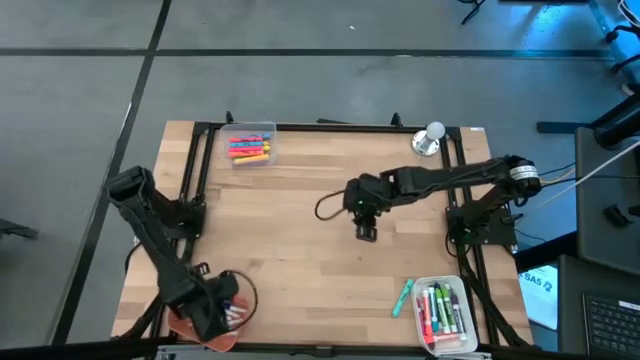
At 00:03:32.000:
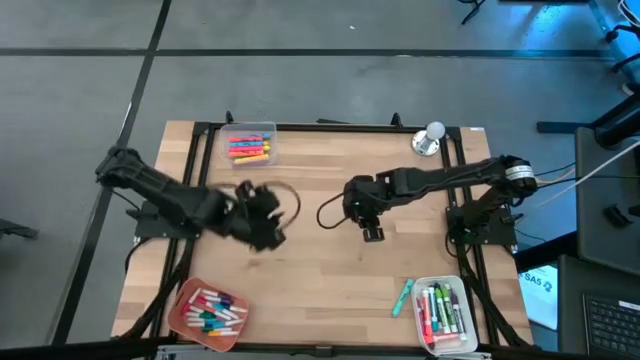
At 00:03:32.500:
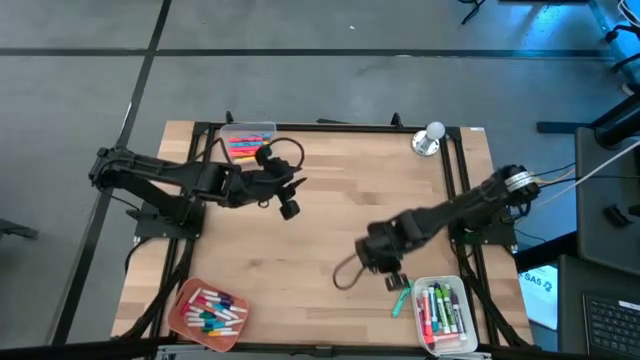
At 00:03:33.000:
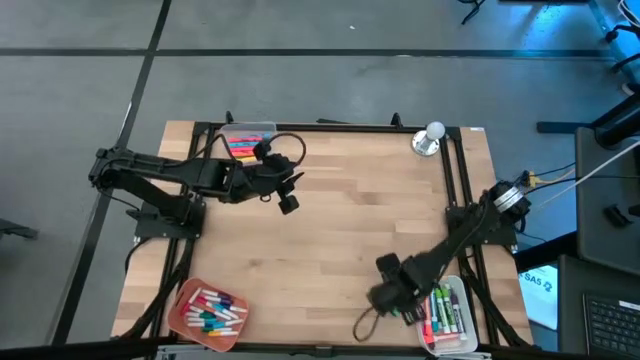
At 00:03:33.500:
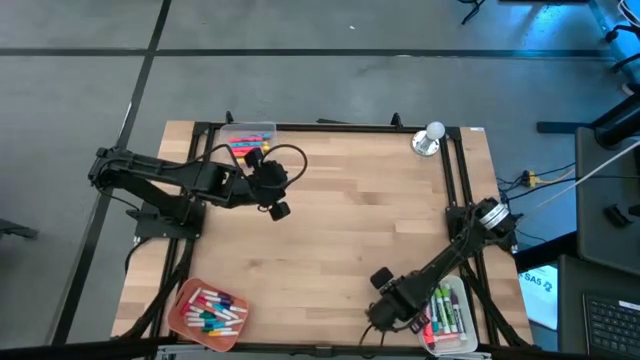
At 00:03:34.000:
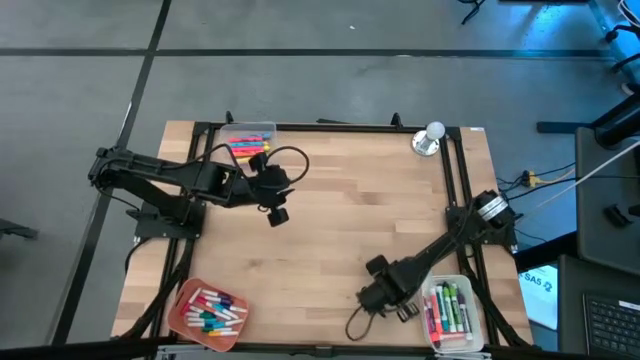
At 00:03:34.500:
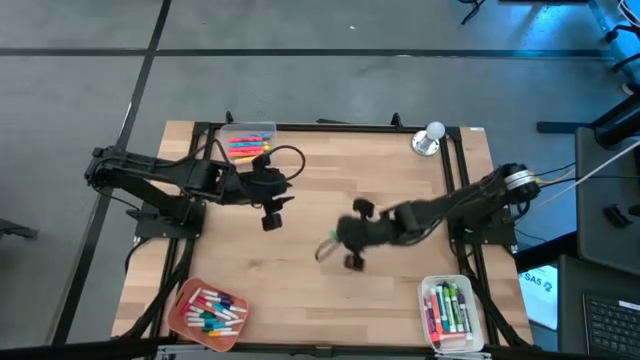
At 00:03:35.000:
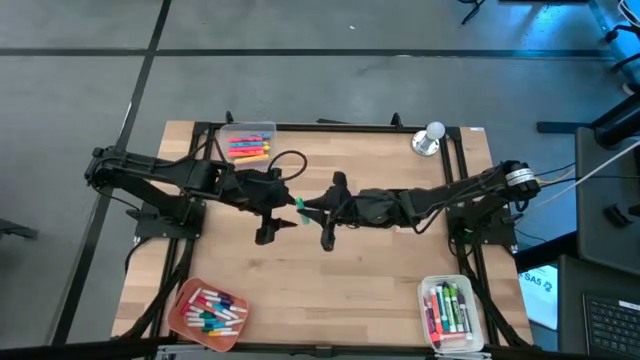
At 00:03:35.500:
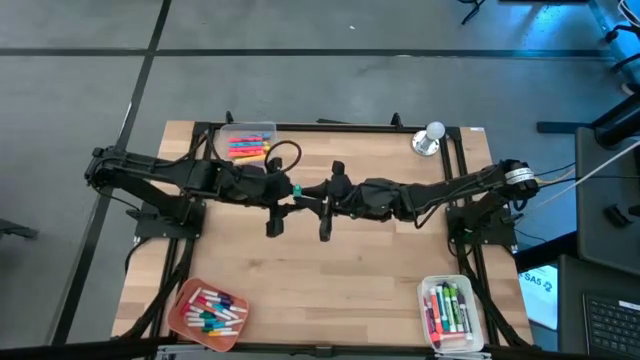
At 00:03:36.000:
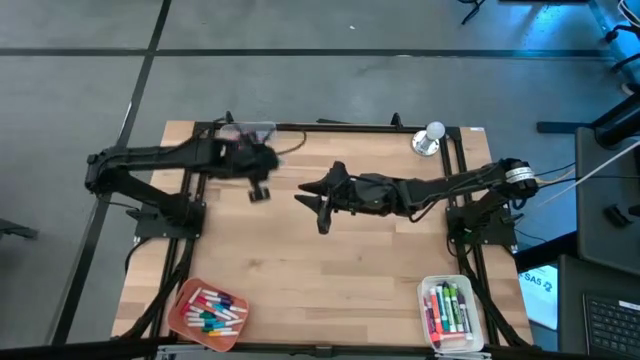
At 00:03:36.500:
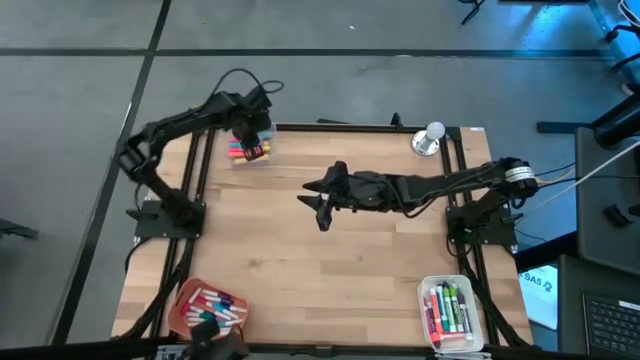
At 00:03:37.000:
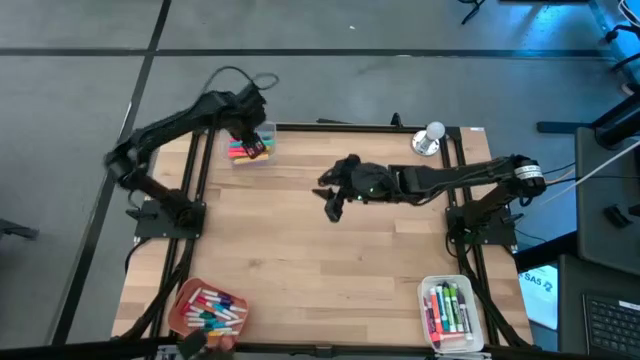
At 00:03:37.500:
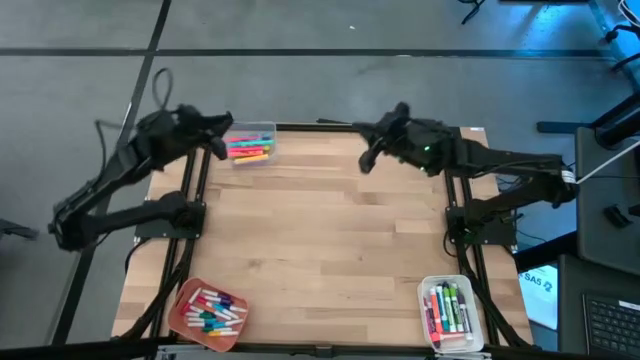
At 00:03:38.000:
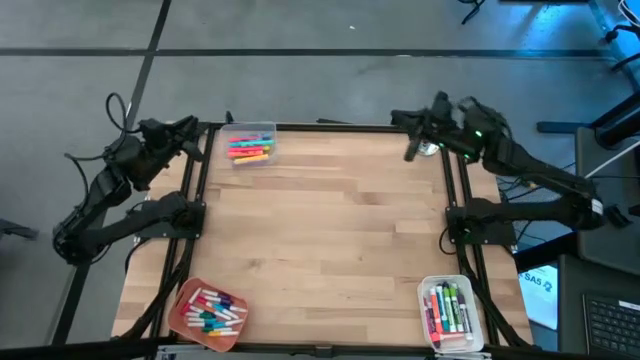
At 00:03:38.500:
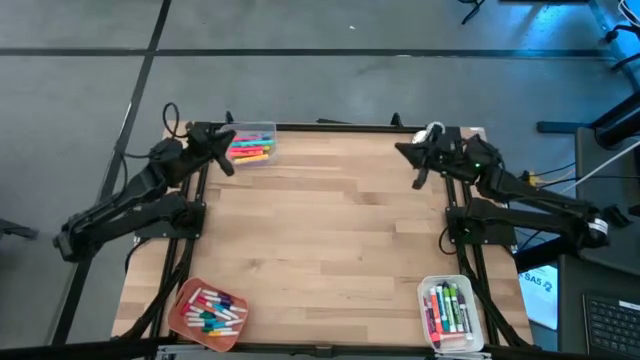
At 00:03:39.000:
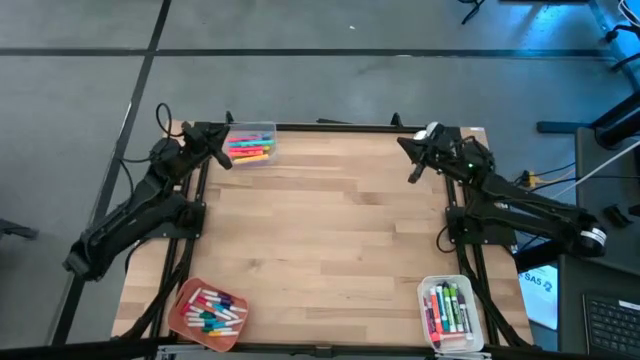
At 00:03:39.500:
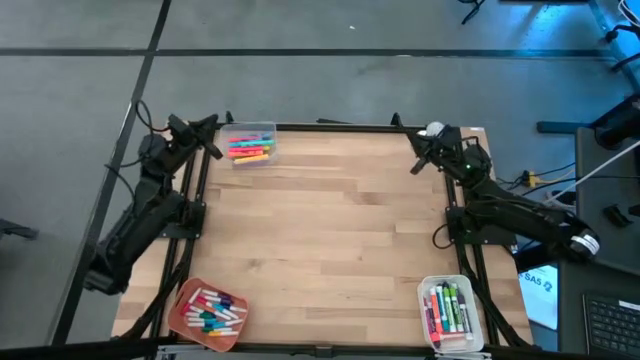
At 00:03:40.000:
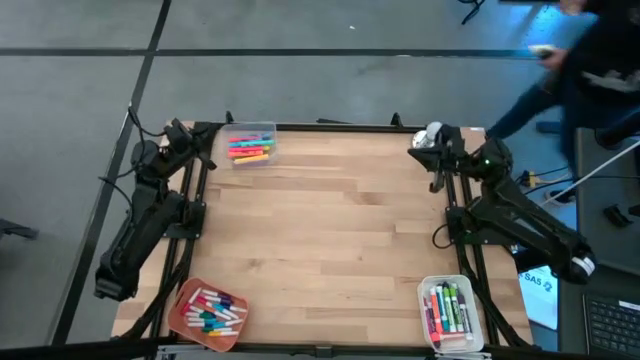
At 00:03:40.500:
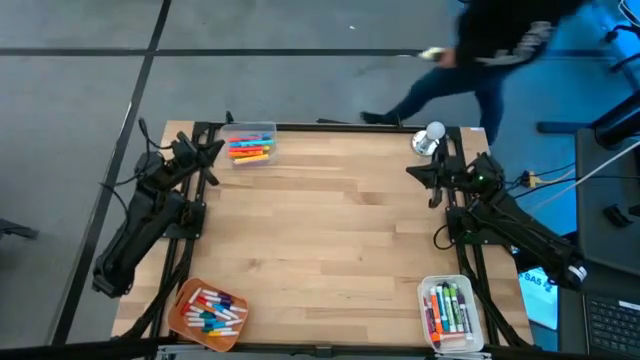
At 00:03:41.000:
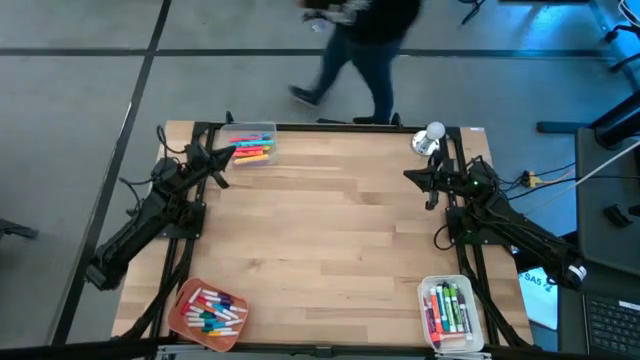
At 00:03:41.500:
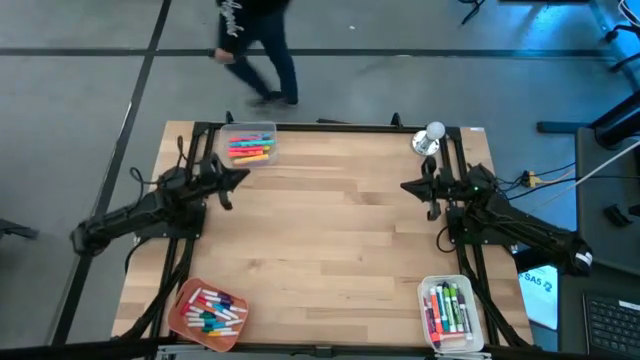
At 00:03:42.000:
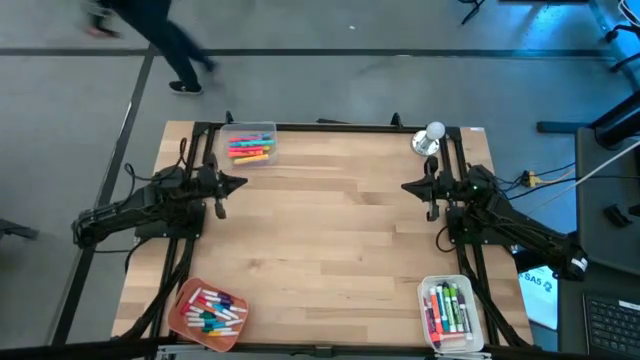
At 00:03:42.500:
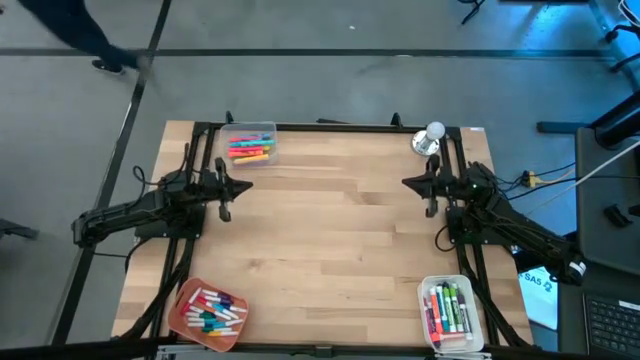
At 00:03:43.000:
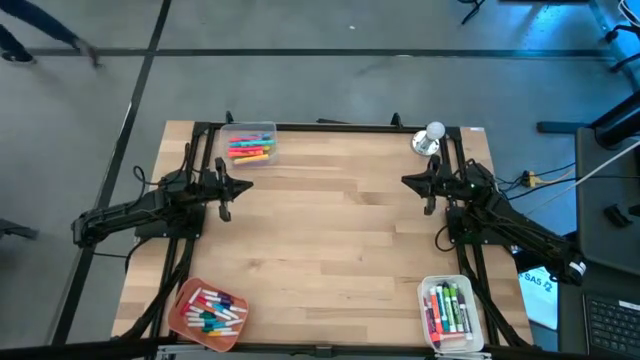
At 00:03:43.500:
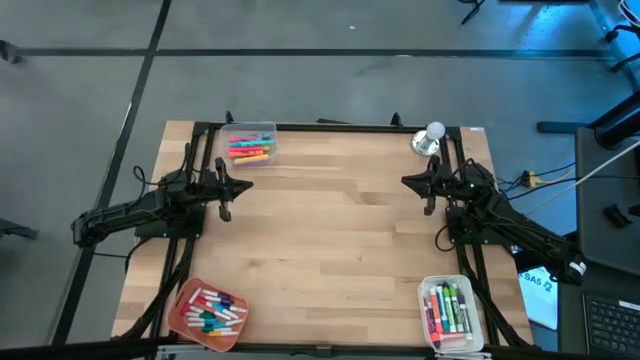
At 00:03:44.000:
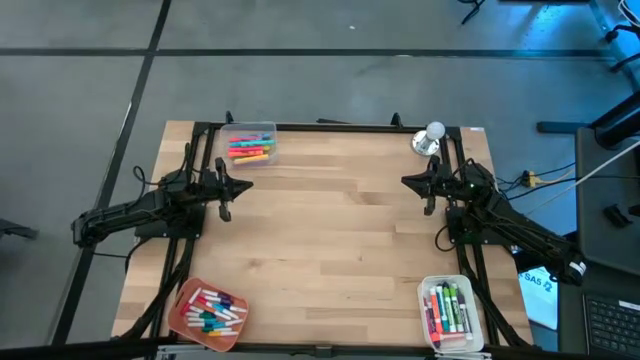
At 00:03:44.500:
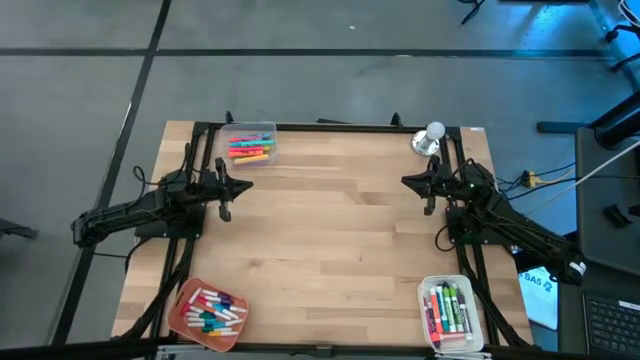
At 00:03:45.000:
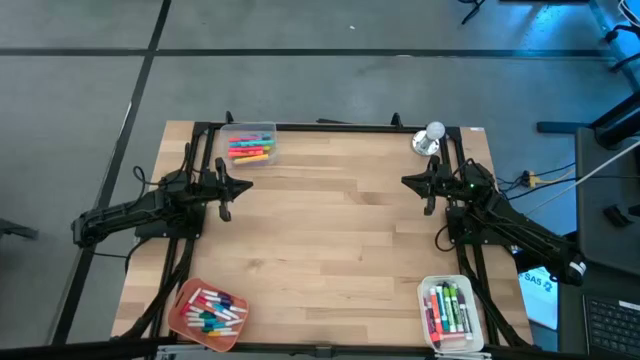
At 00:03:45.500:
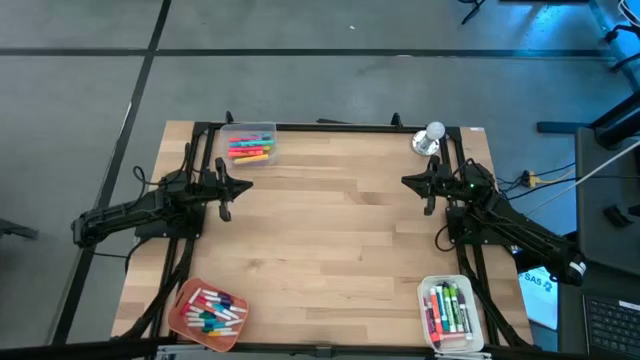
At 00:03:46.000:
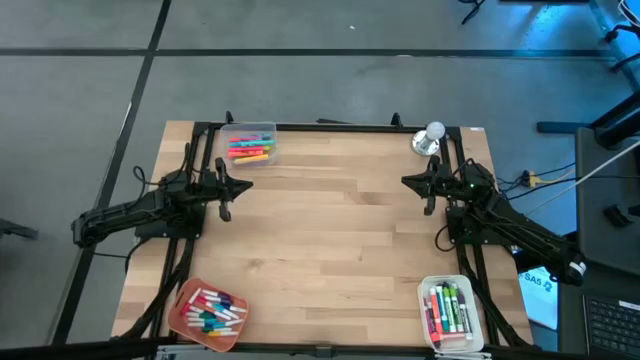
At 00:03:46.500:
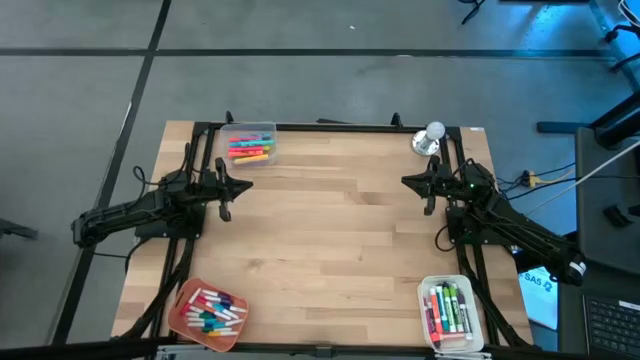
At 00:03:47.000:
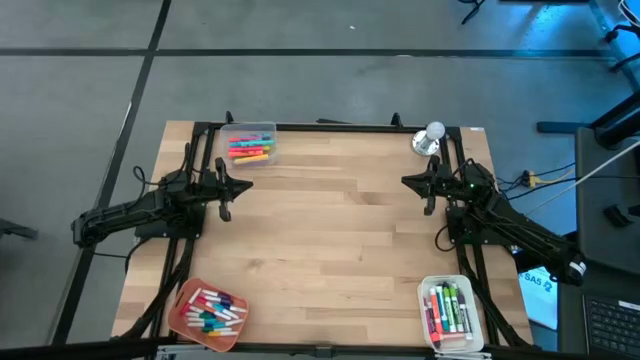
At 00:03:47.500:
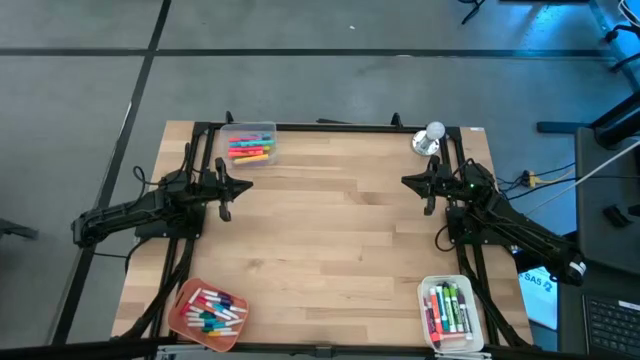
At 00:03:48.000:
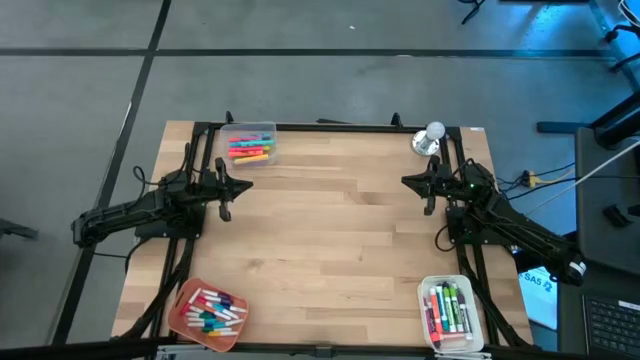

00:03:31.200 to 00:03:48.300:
Task: Pick & Place Markers
Return to Home Position

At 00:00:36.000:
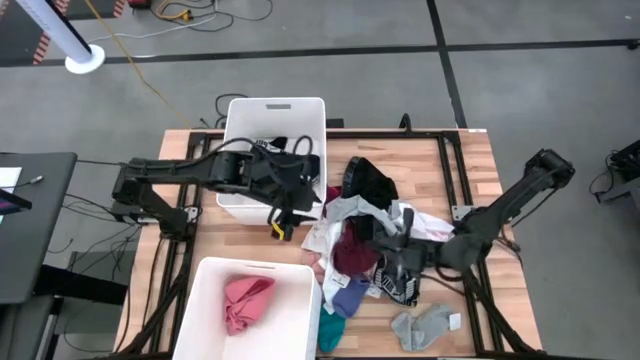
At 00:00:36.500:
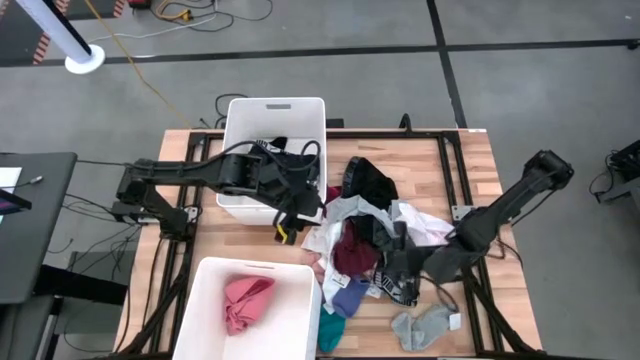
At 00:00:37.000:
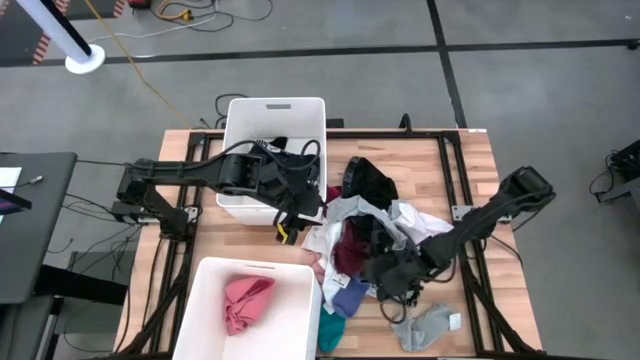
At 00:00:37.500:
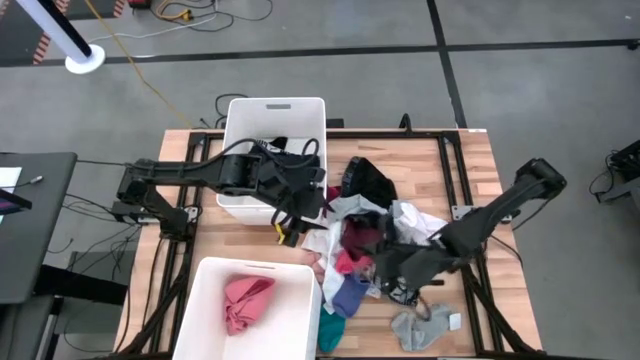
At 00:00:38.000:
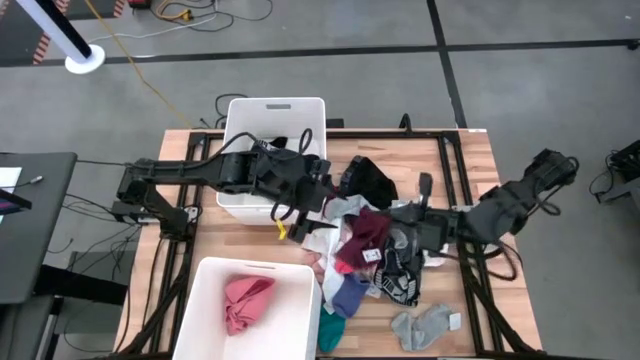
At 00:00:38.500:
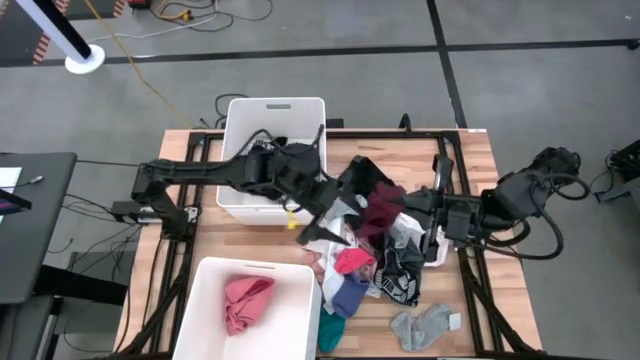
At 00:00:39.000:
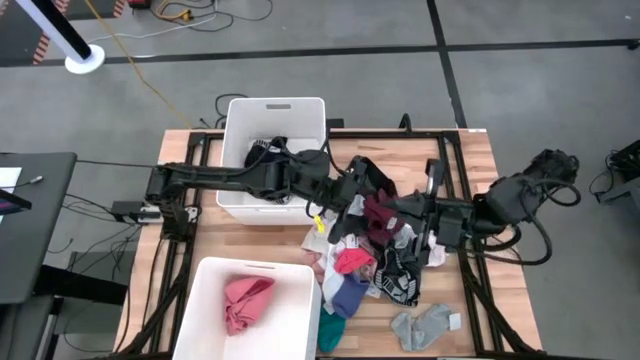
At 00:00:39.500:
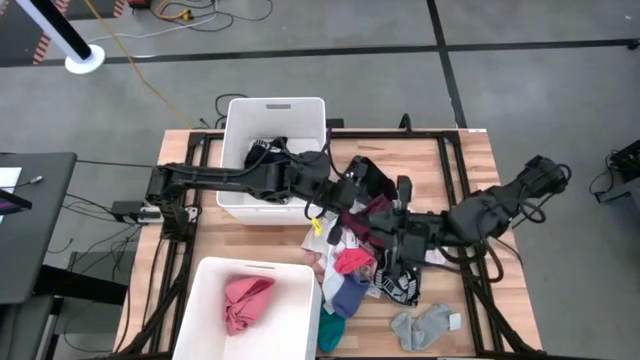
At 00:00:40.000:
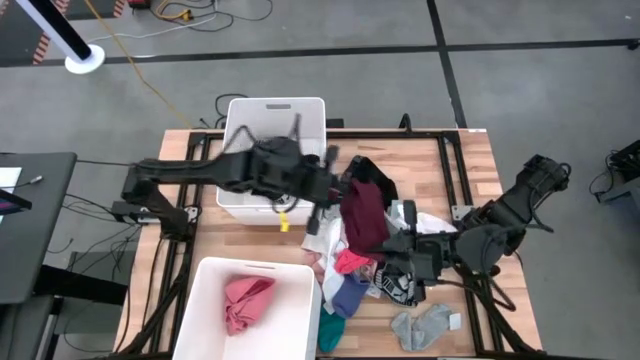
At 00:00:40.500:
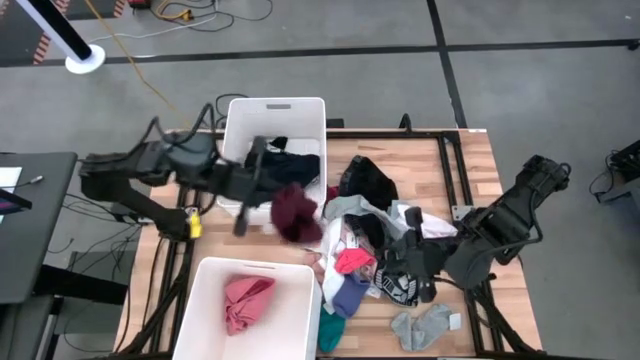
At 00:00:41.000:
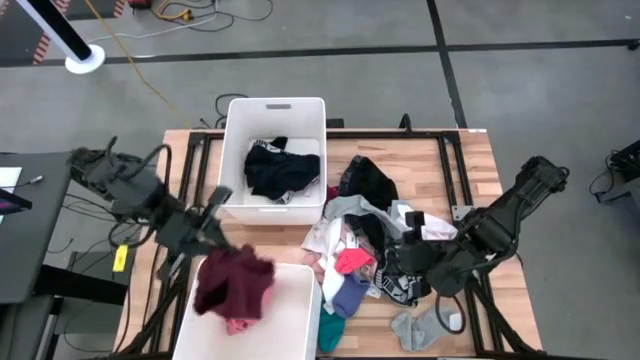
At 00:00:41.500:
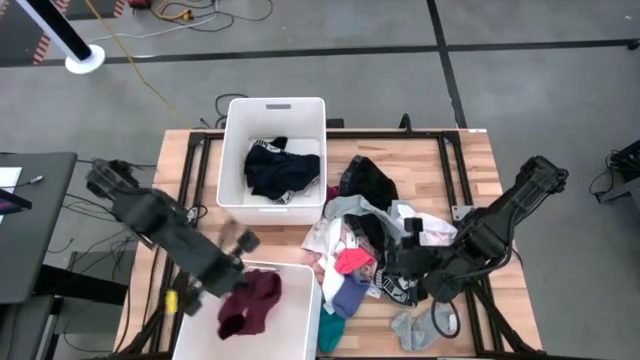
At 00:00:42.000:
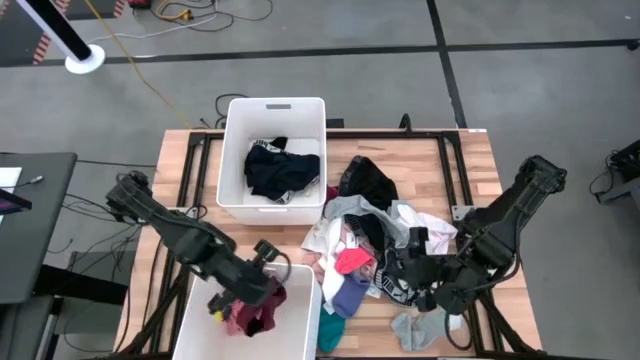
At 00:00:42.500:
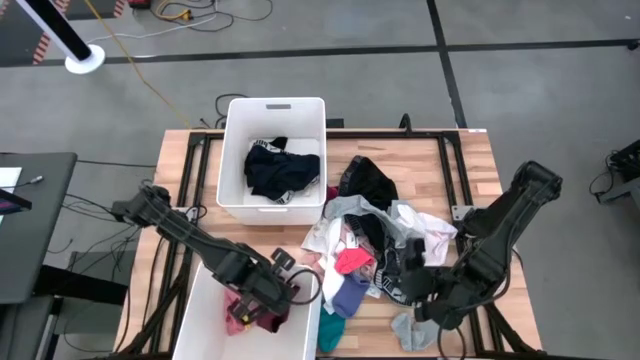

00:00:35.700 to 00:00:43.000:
Task: Sort clothes
Put the red underwear into the bottom white laundry bin
